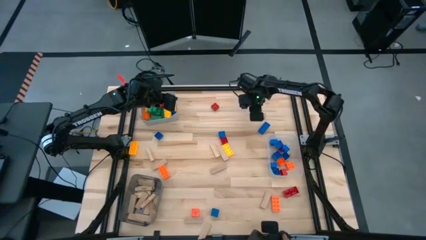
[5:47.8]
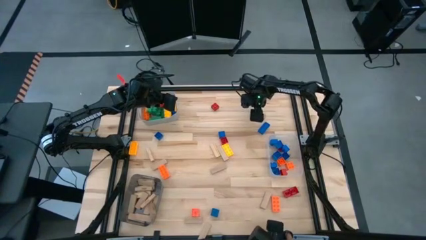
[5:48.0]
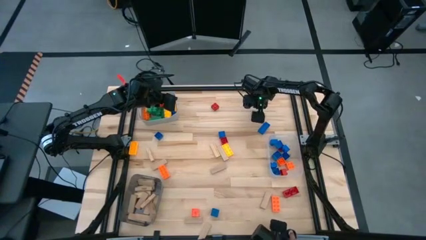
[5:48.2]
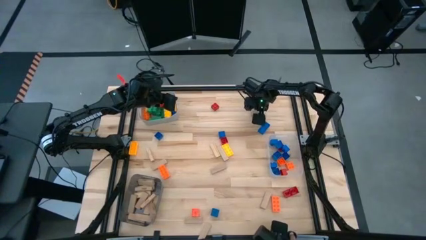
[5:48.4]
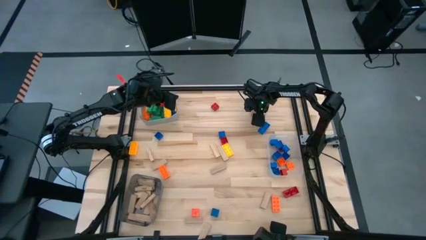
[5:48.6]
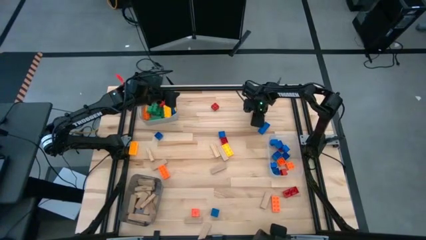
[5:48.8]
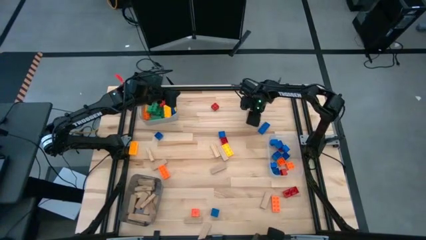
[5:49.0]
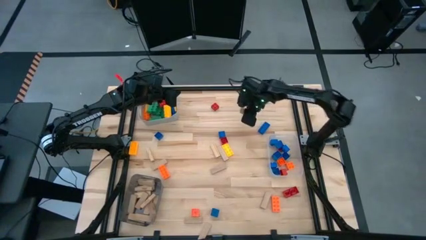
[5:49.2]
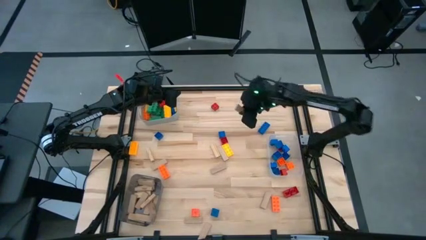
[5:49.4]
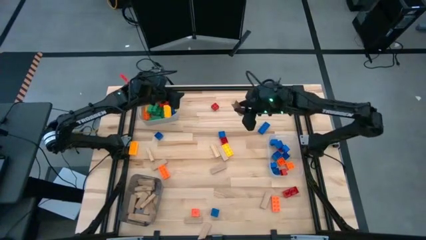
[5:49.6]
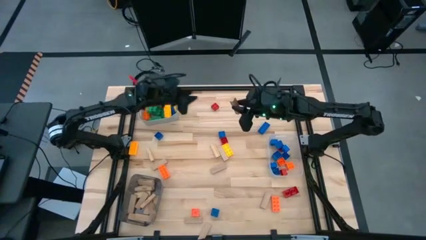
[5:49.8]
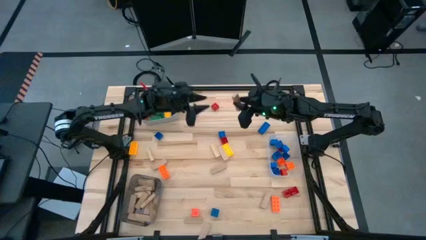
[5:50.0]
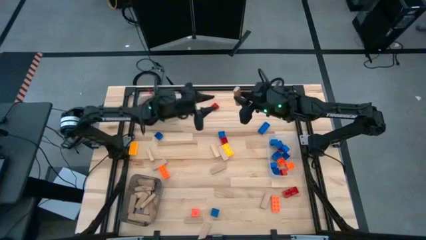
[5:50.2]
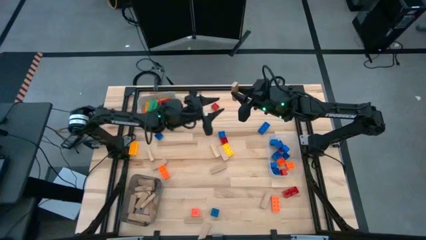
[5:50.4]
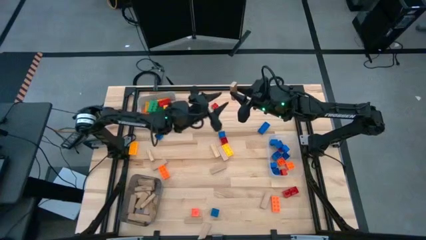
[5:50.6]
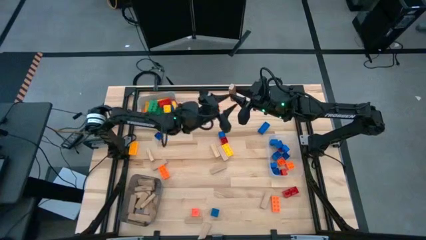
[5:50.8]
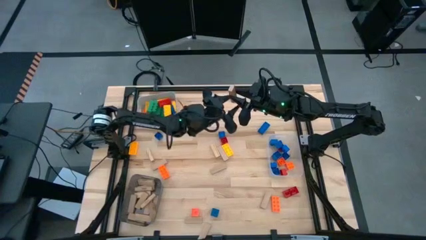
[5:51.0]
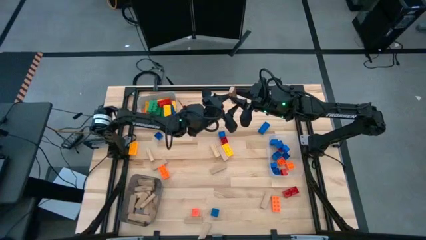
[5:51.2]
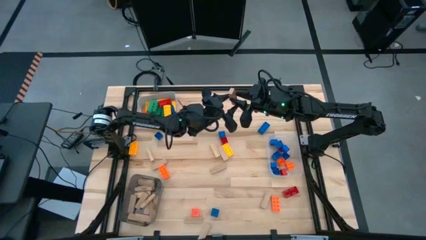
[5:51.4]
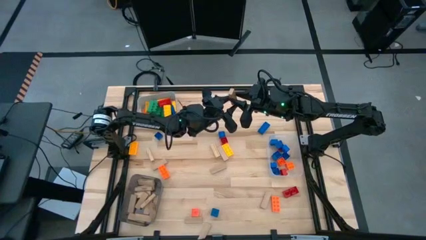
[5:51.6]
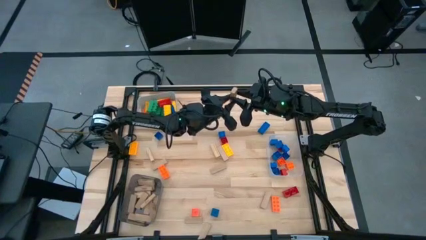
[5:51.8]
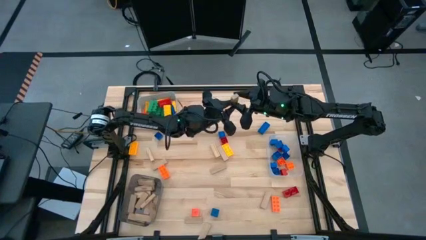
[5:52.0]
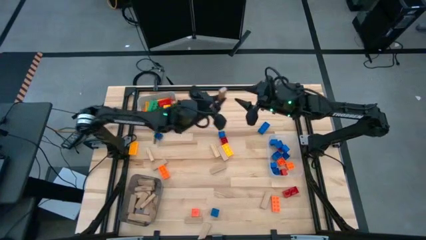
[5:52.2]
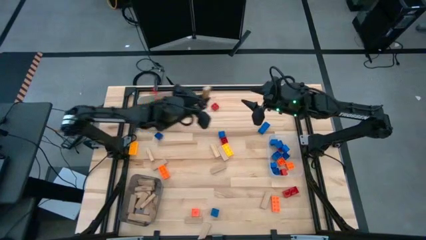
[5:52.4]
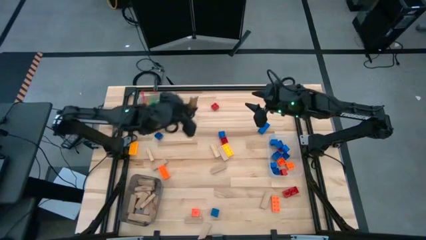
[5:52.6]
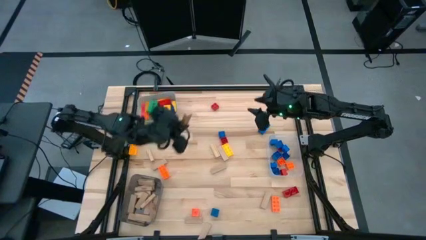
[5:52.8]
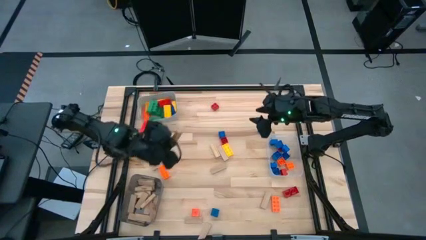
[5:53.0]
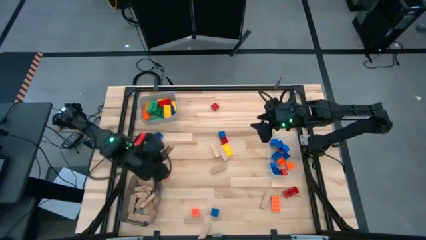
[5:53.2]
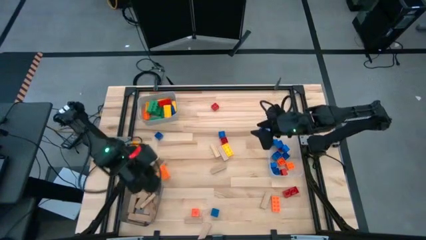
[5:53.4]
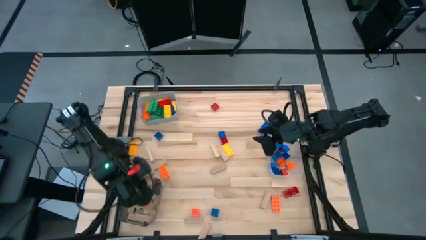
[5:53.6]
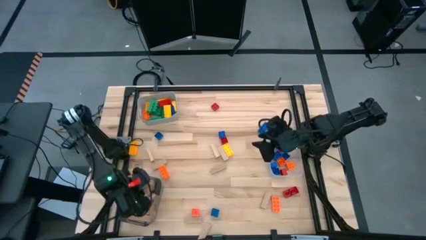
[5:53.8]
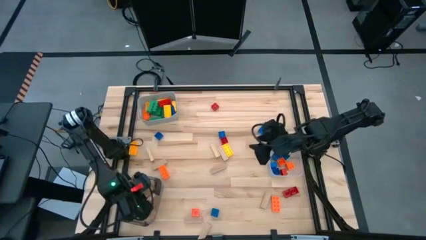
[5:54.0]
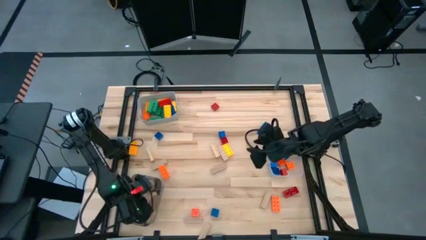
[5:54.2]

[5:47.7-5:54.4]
Task: Sort blocks by size
Put the brown block into the black bin

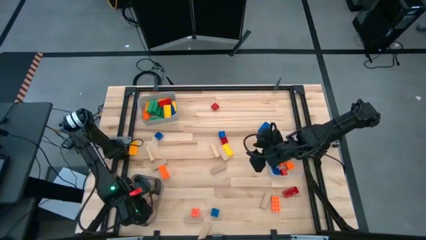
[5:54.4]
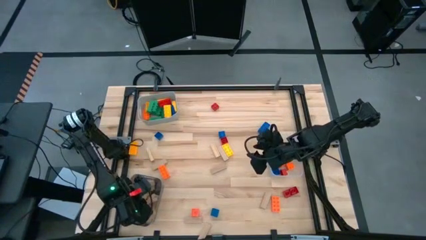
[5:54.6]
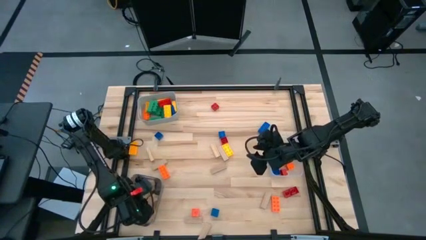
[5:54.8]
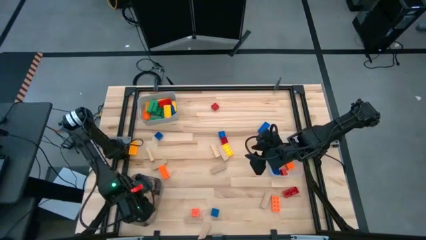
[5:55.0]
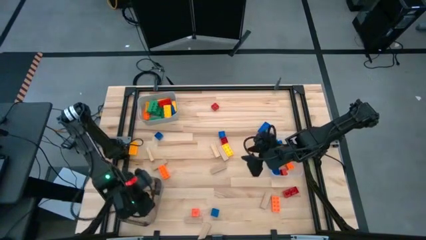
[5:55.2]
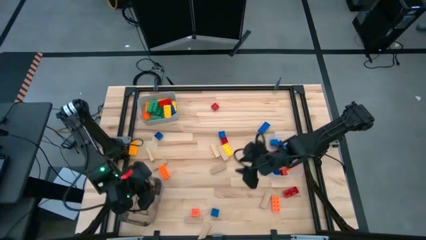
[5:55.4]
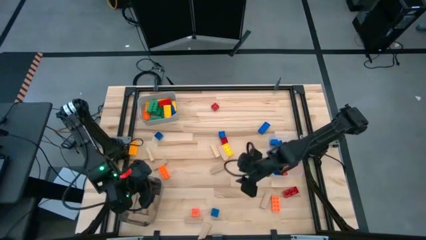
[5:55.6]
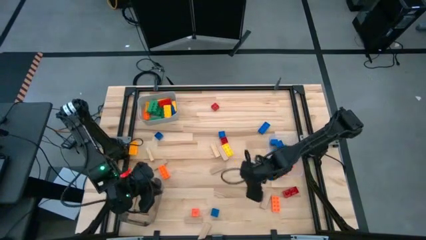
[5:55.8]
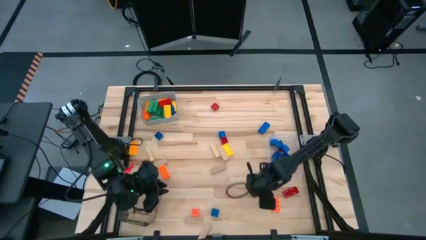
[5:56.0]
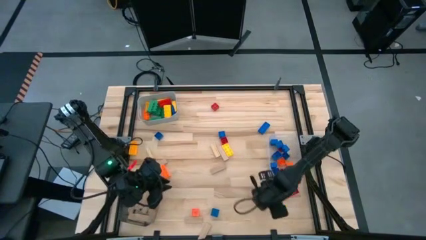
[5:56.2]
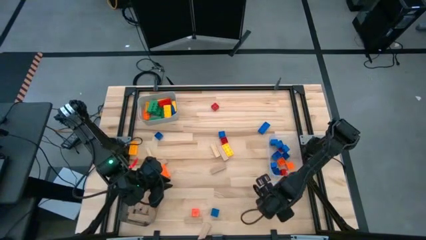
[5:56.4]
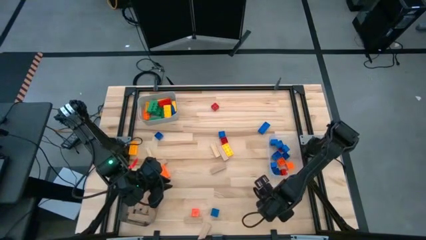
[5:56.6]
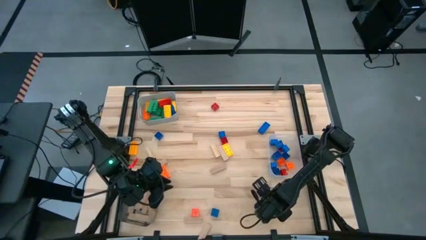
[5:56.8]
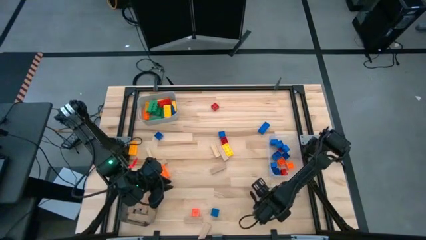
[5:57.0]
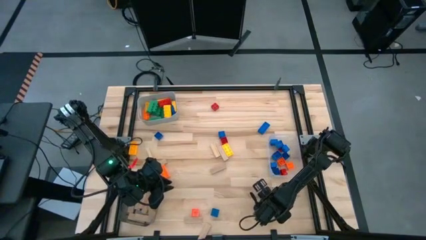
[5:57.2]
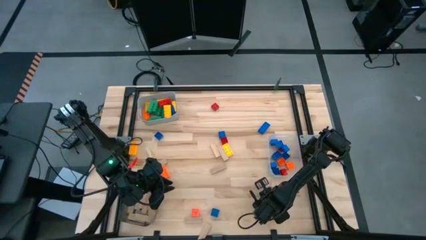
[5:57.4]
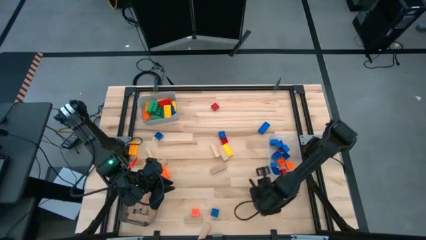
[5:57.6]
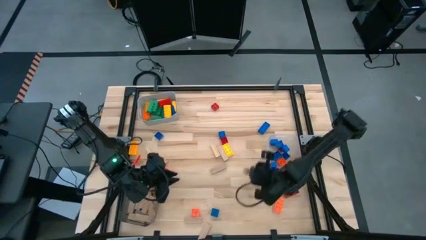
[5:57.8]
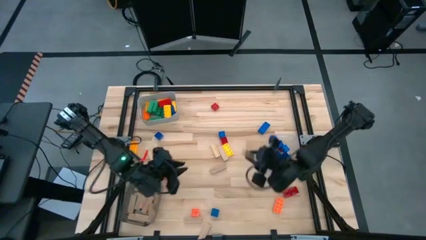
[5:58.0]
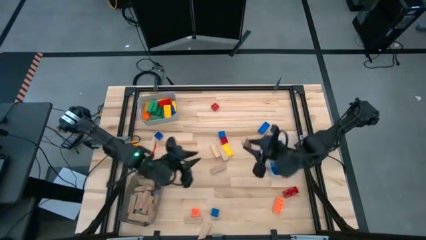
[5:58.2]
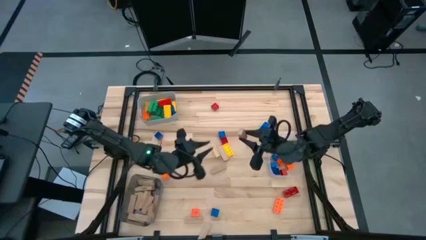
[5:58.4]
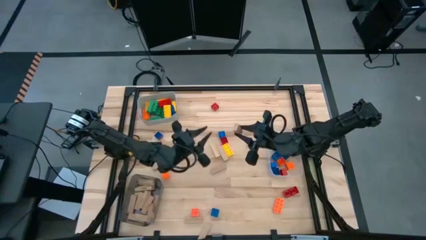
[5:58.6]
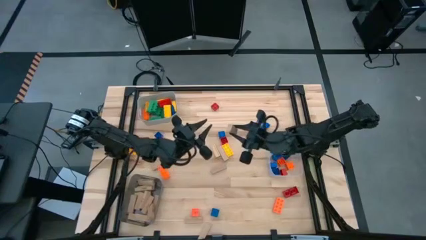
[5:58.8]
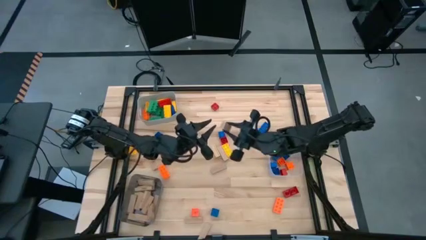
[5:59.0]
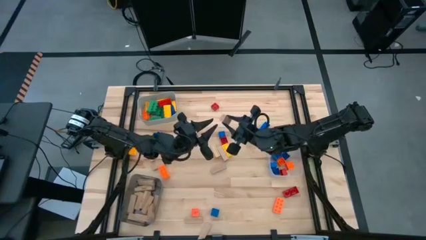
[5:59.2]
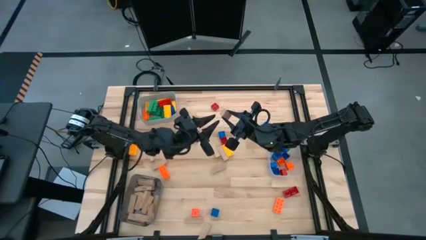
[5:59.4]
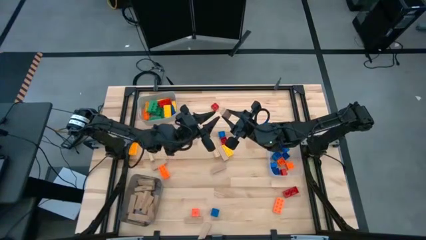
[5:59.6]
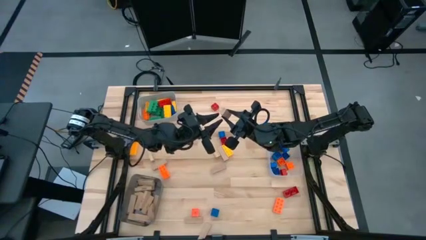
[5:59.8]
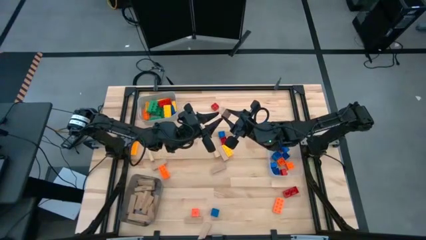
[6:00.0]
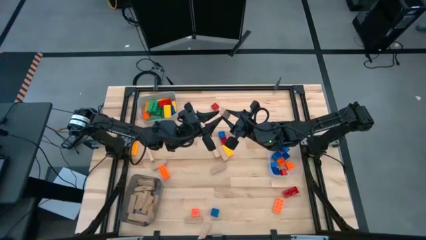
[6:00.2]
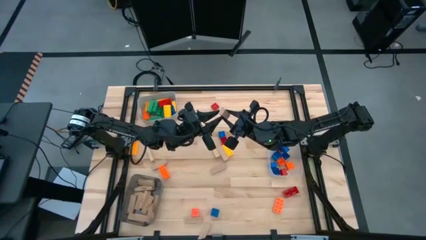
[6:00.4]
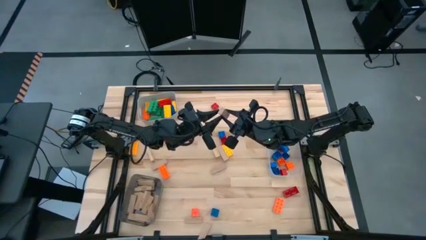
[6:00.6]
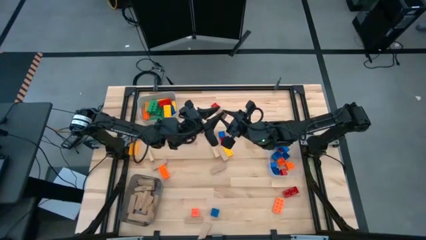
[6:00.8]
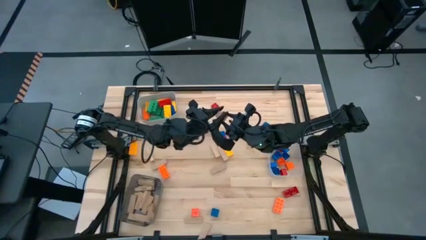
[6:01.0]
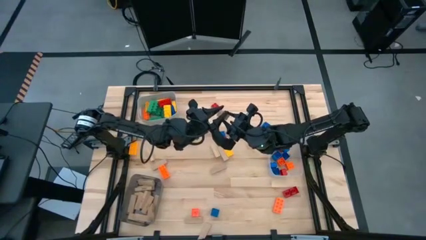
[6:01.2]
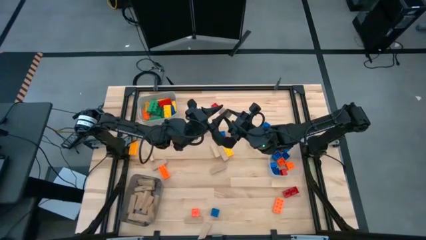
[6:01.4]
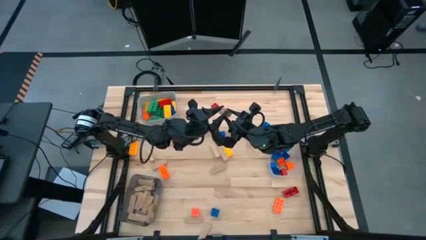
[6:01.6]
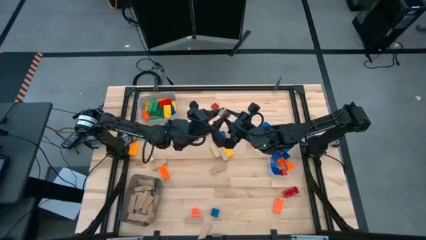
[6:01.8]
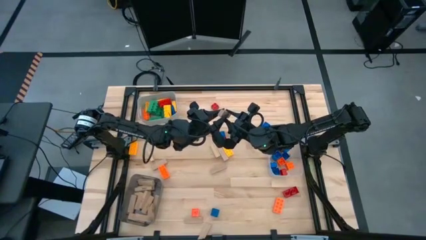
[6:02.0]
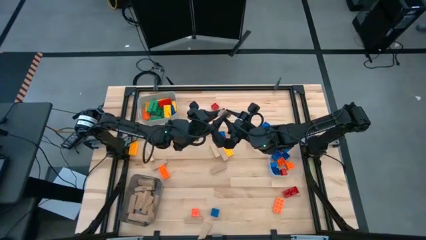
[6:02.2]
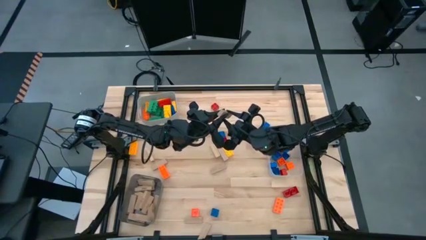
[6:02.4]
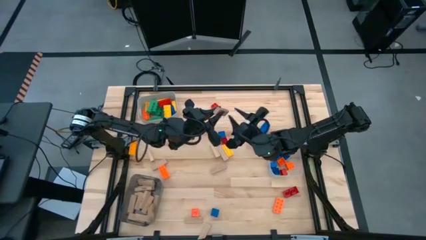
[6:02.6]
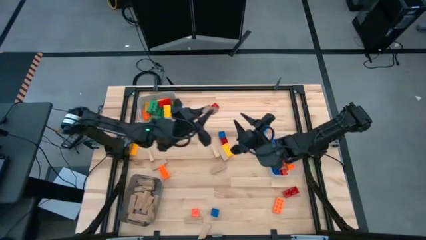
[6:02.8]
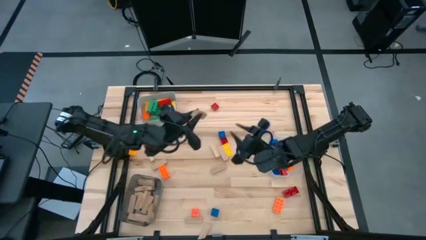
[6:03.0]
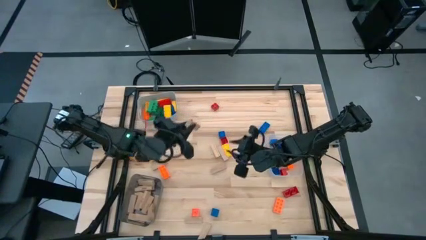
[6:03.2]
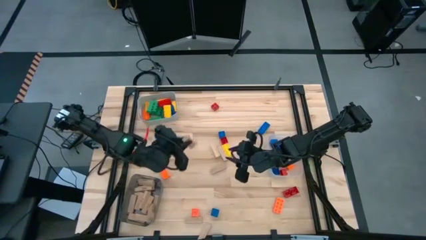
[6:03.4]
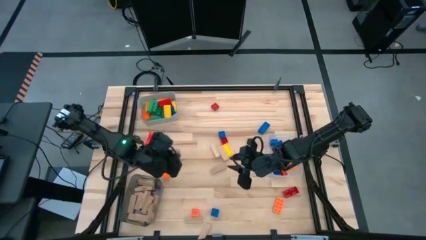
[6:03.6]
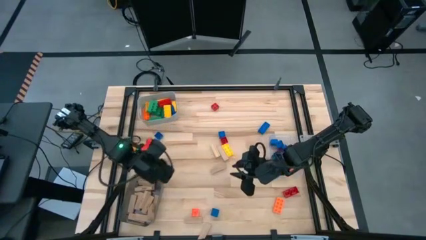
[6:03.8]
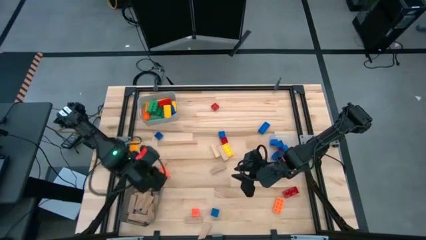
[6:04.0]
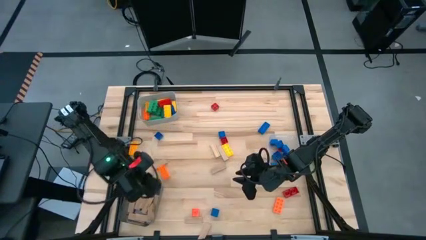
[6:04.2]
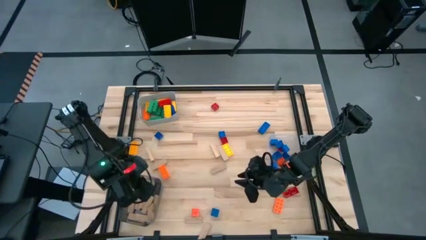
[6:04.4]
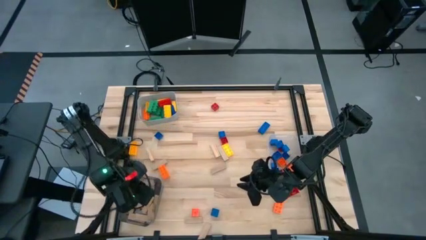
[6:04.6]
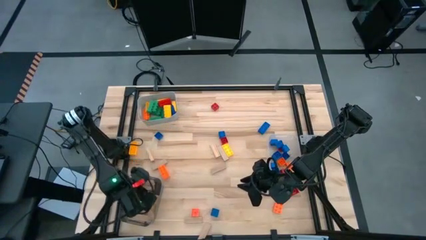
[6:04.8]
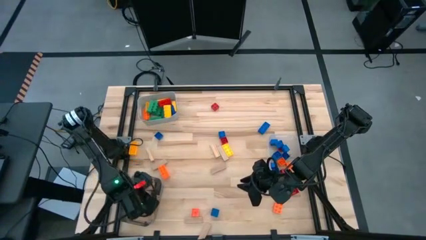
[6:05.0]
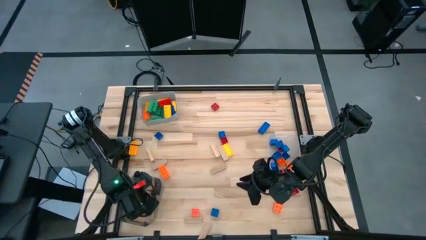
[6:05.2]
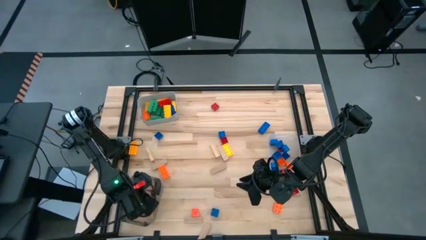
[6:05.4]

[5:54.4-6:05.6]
Put the brown block into the black bin
